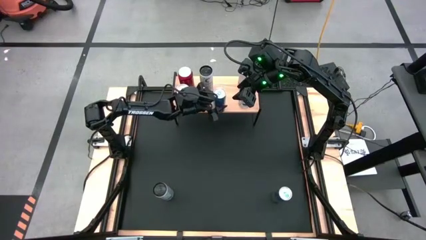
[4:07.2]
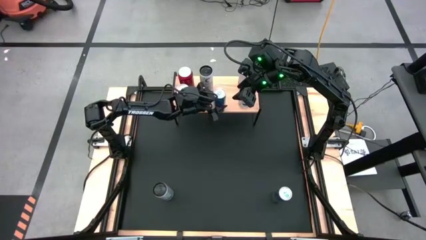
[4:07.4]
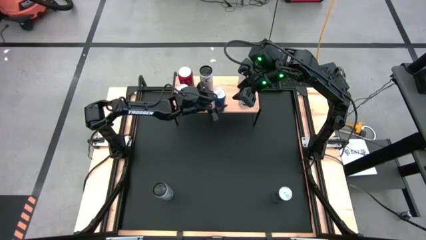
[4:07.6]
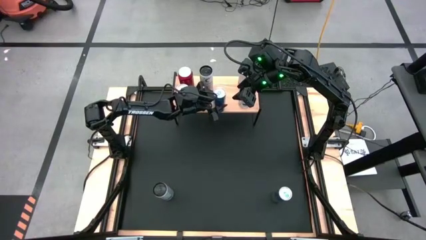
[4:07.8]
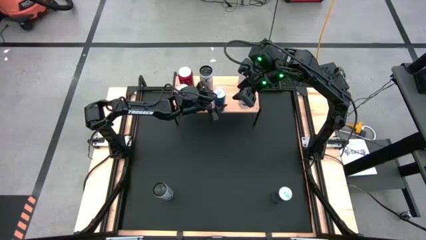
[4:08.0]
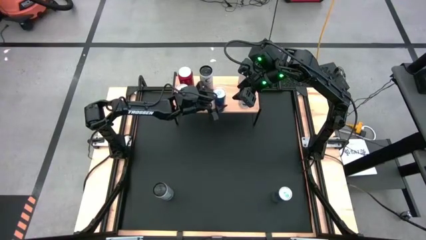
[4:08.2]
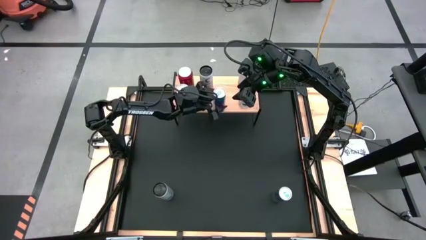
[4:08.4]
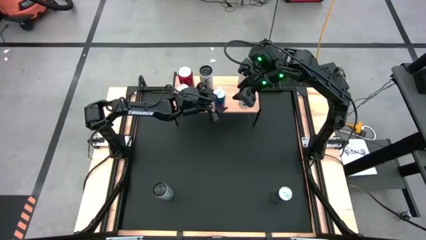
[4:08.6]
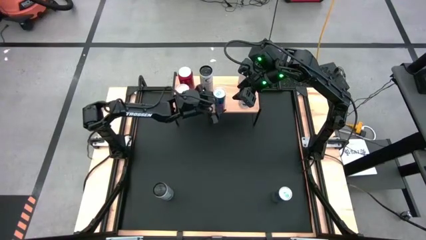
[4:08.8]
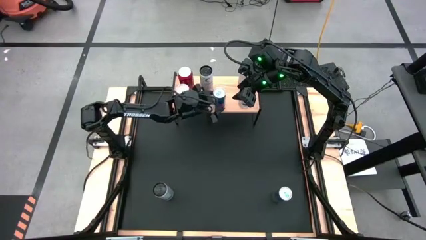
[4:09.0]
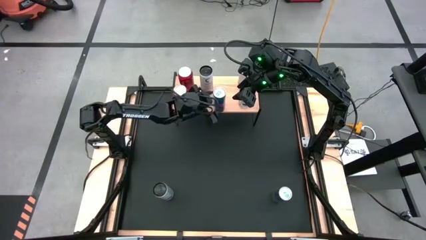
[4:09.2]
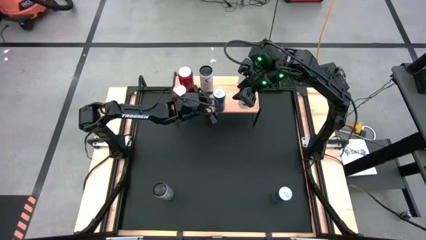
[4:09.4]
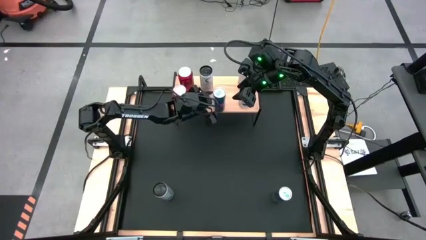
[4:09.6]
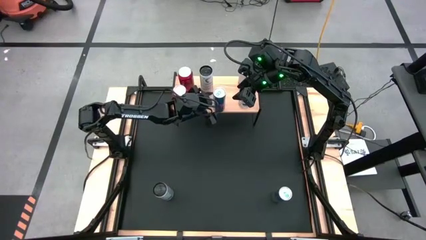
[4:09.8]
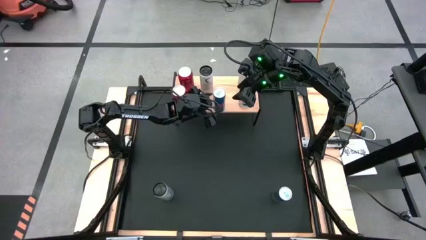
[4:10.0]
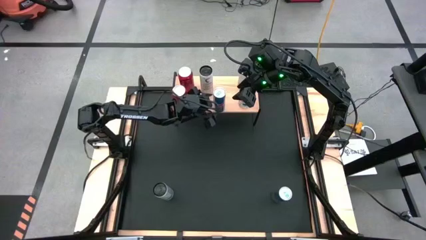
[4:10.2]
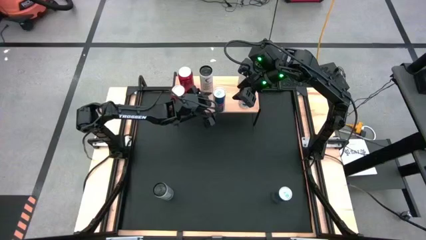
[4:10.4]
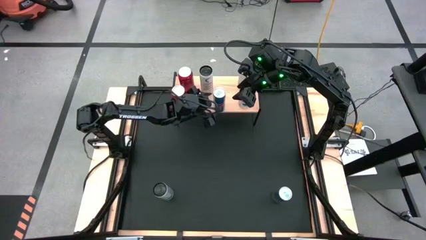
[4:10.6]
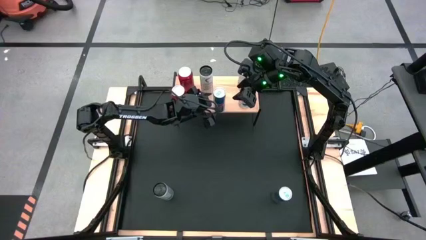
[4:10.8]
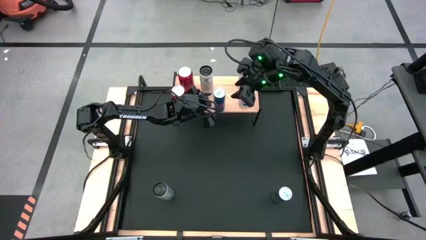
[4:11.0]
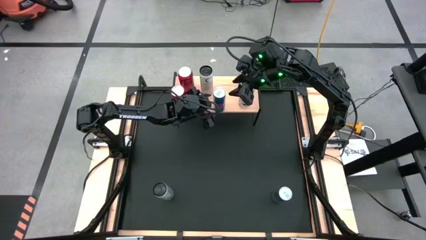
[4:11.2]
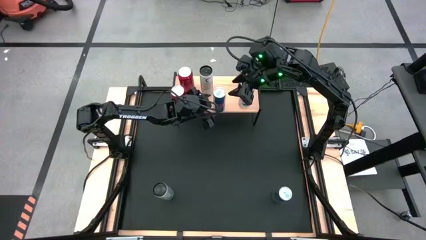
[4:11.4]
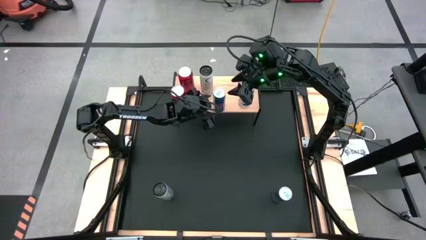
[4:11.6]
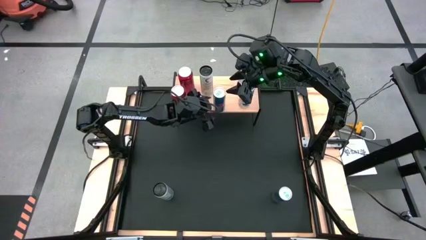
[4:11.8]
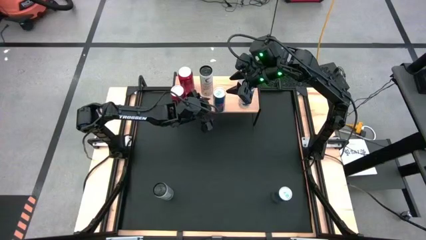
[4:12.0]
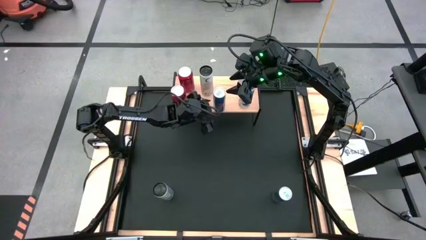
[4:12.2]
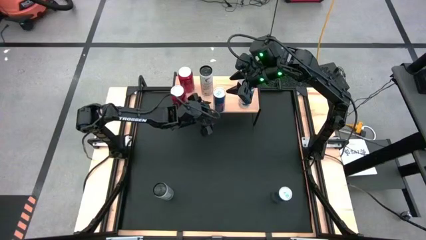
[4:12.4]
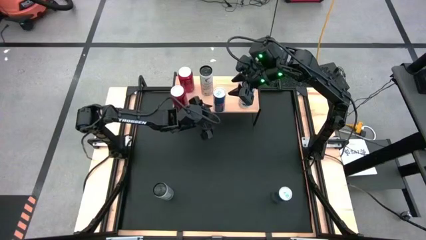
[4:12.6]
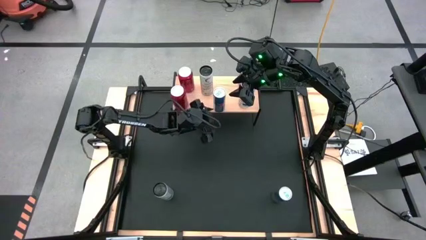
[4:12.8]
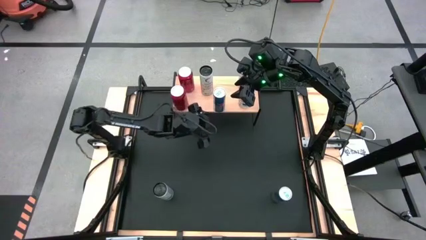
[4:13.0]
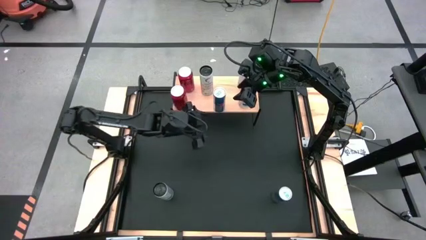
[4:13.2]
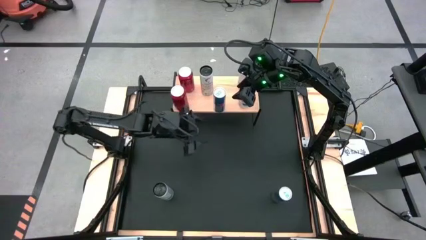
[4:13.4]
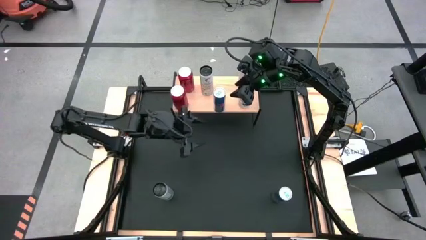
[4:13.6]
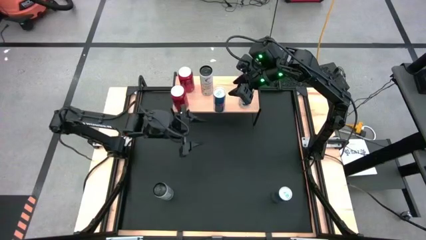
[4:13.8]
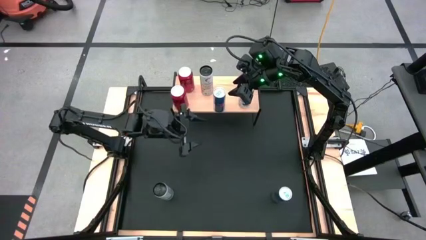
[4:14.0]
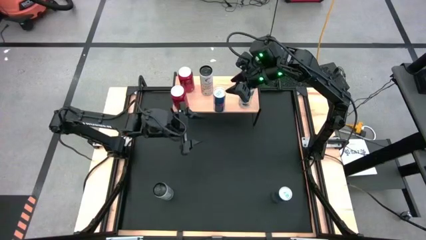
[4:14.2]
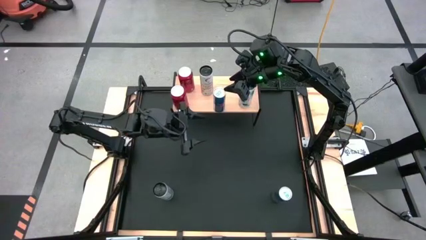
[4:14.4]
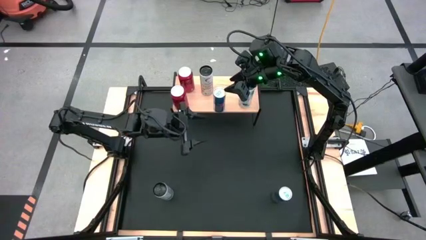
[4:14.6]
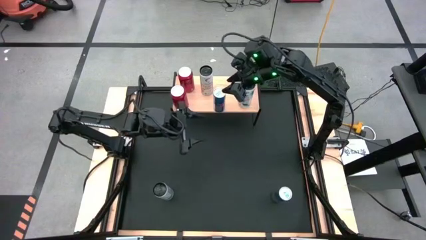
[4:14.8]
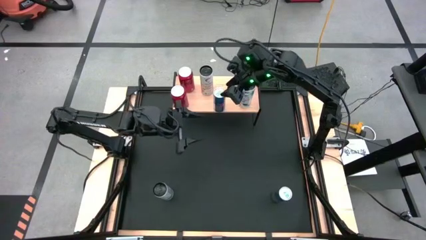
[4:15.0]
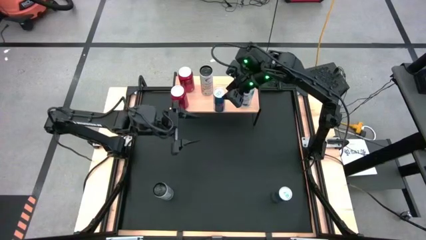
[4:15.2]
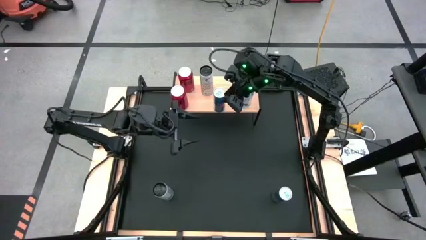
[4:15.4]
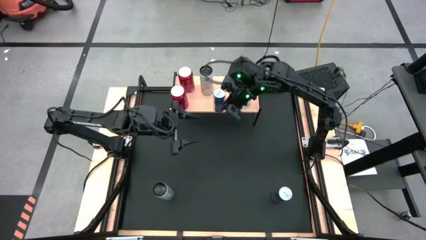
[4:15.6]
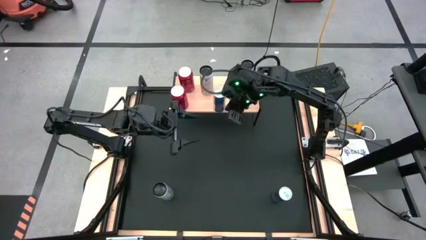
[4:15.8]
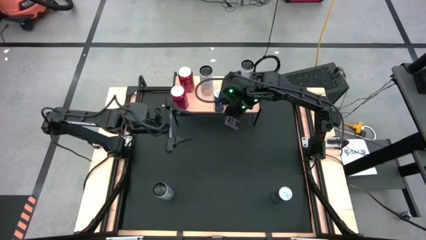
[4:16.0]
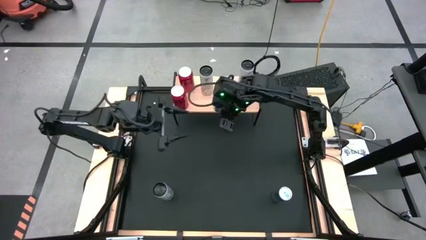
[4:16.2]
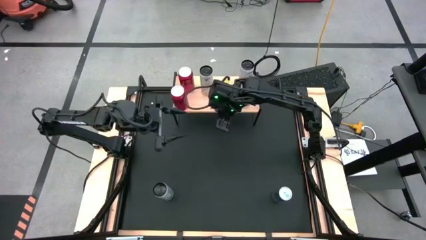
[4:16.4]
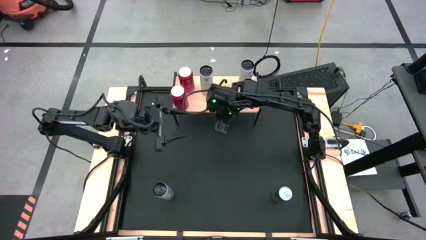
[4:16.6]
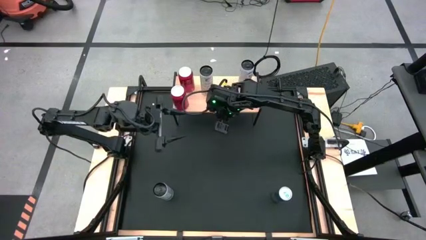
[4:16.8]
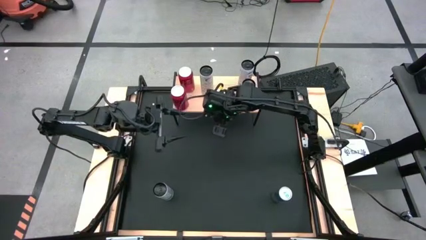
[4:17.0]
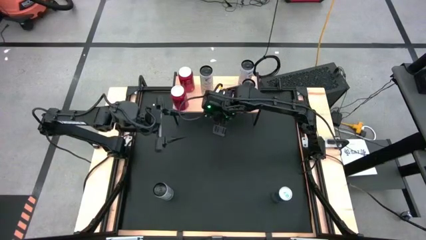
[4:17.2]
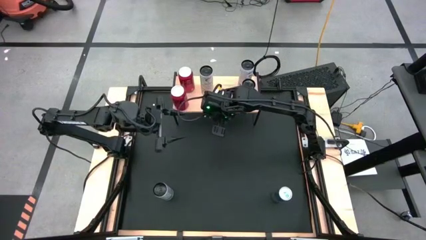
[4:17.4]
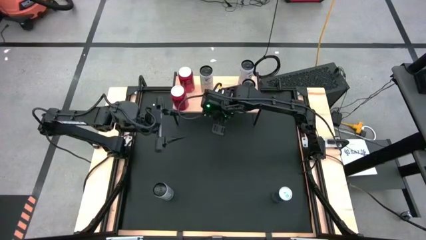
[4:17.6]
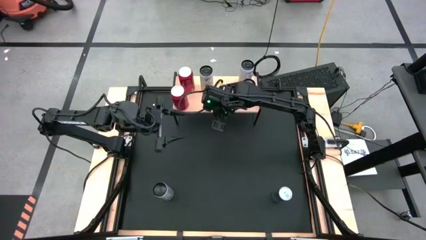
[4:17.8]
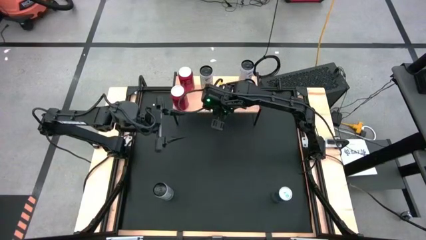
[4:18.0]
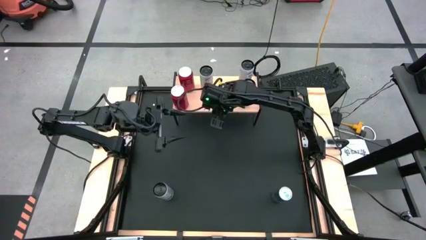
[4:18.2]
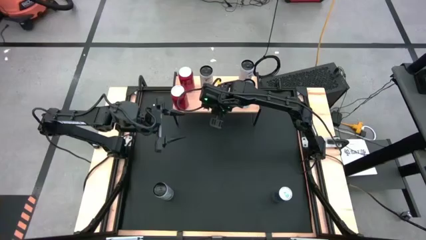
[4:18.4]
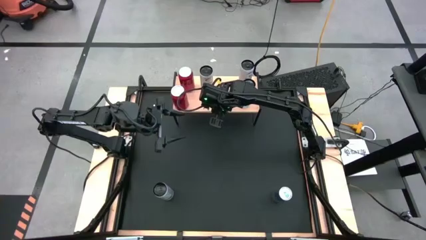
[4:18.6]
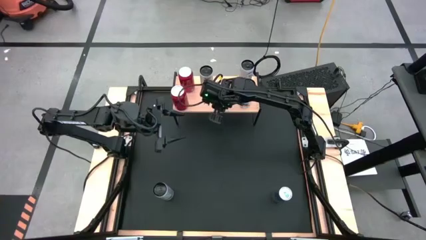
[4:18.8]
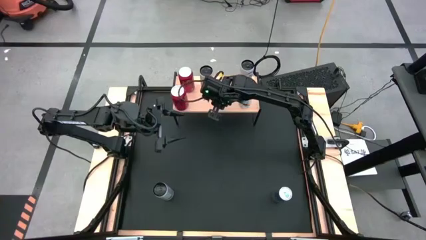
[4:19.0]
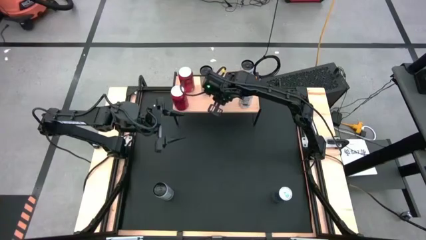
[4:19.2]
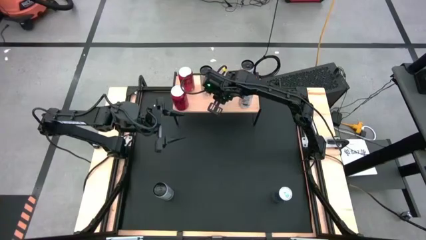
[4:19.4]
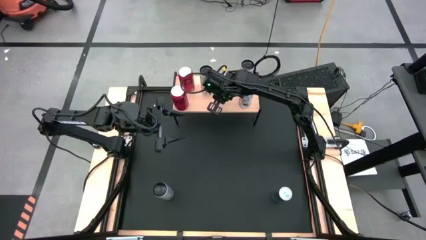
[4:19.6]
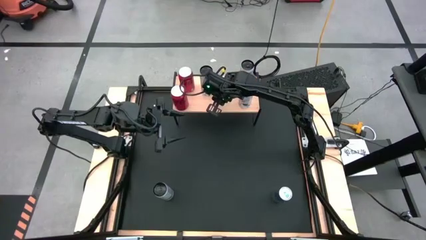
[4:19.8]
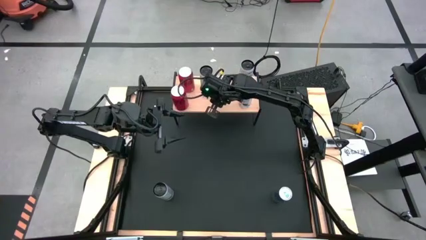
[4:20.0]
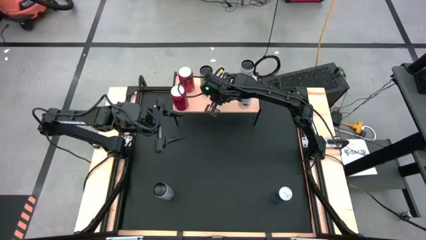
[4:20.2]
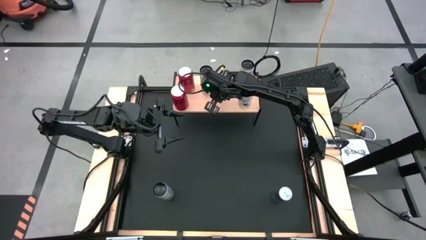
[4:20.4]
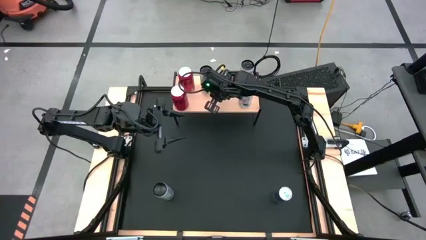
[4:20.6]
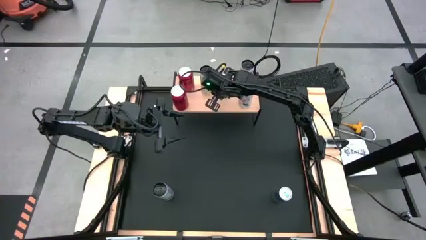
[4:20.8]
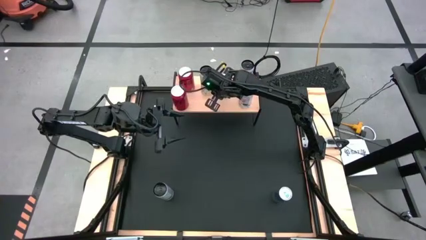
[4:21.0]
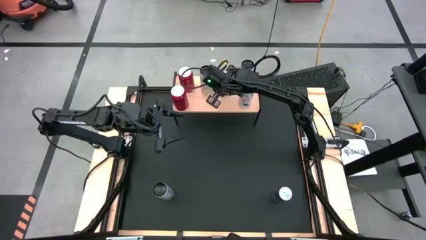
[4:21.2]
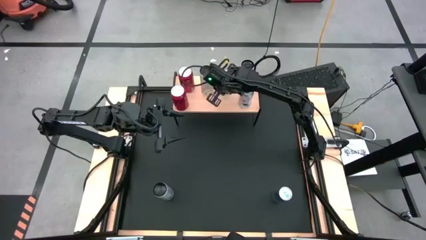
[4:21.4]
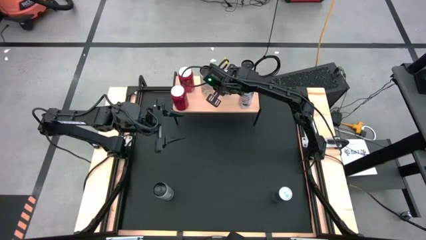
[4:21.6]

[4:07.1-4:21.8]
Task: Place canned beverage on shelf
Put the top blue soda can on the shelf

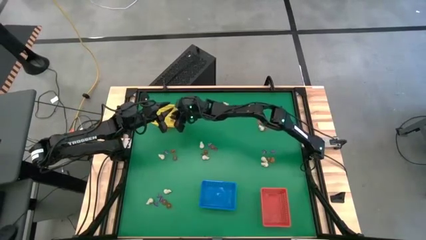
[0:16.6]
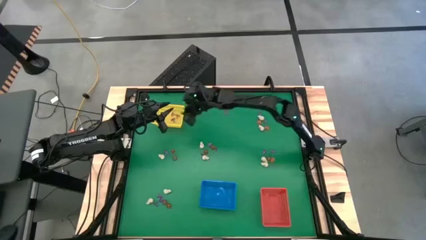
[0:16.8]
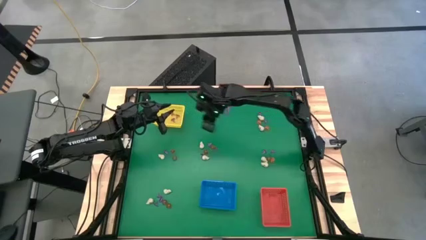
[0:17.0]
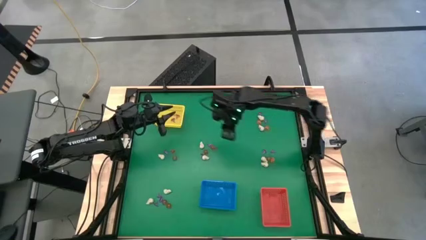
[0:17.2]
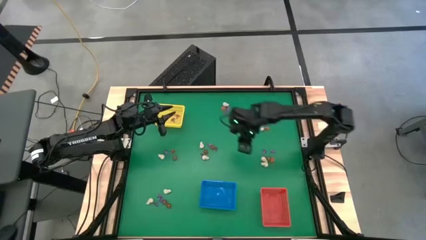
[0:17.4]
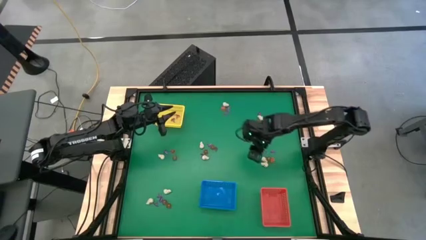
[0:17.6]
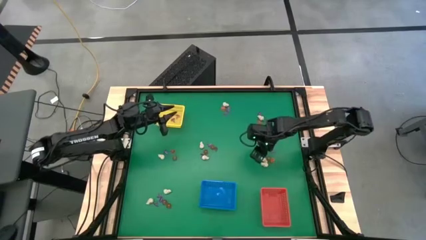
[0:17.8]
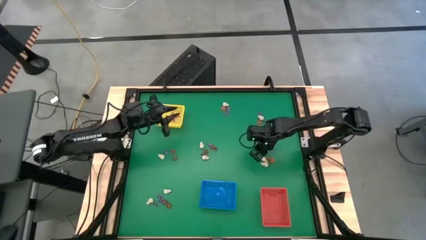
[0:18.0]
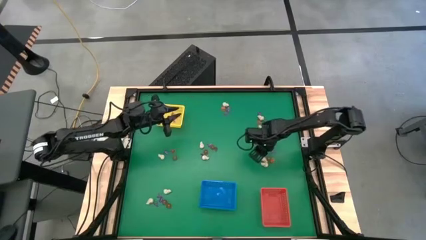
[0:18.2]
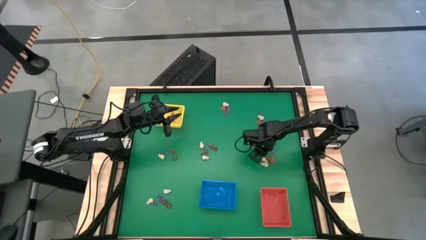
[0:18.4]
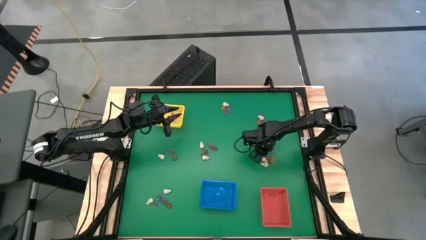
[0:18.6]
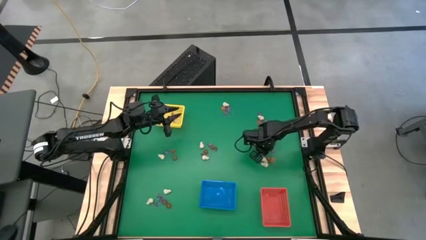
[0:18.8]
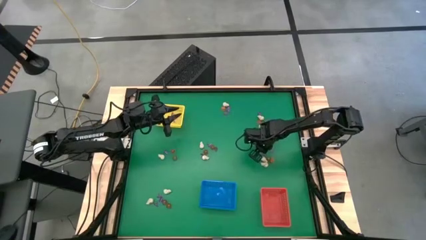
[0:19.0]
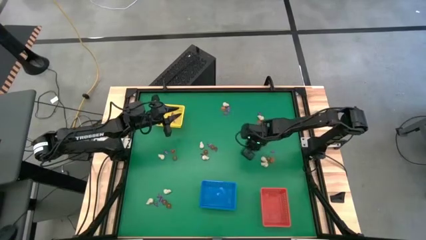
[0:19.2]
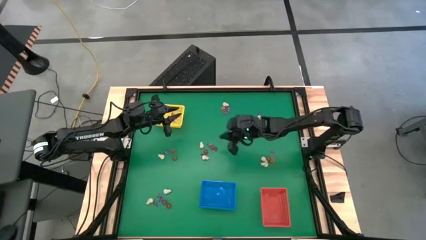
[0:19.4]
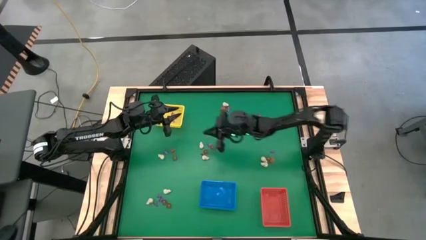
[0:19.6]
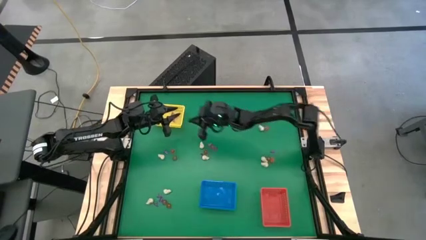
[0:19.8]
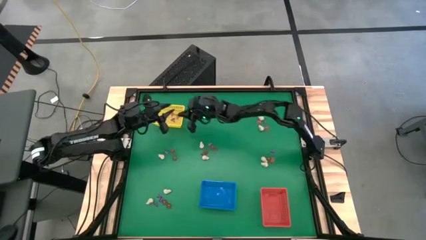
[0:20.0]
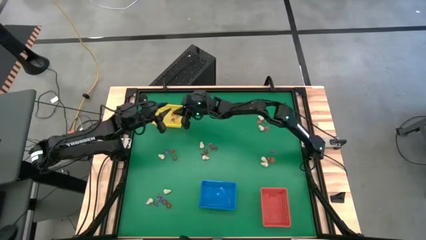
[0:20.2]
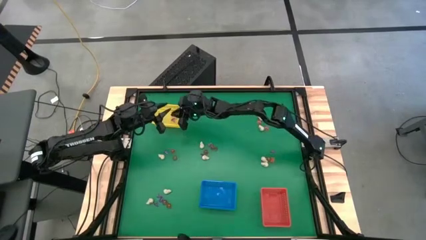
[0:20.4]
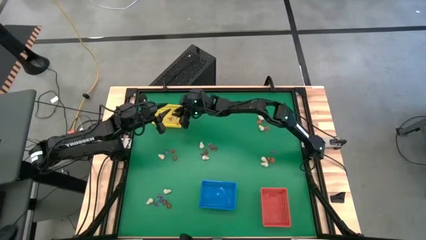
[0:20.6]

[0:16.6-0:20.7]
Task: Sort Halloween decoration
Put the purple witch hat toy into the yellow basket
